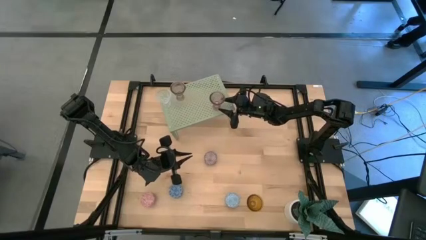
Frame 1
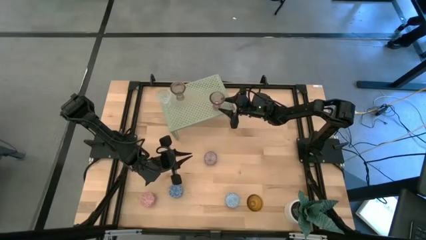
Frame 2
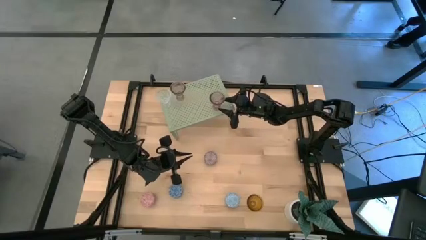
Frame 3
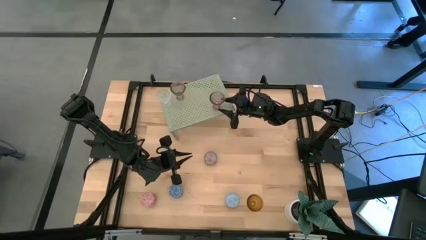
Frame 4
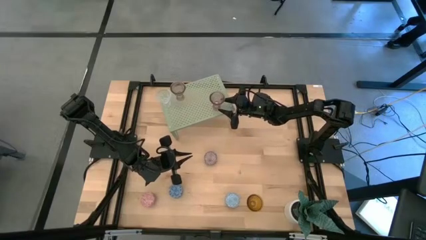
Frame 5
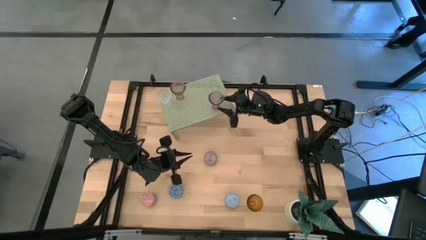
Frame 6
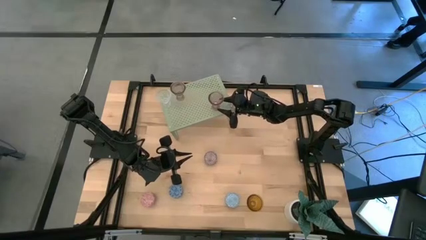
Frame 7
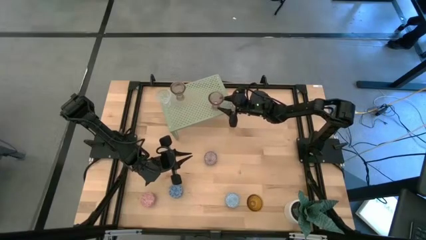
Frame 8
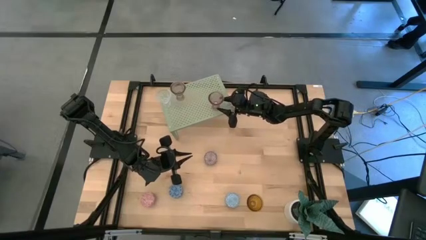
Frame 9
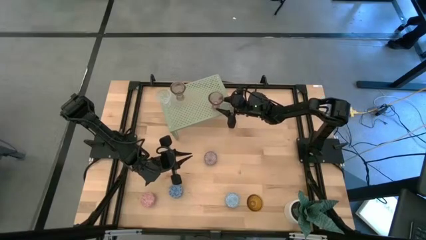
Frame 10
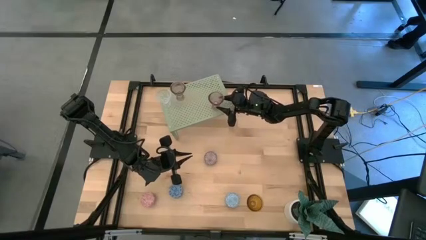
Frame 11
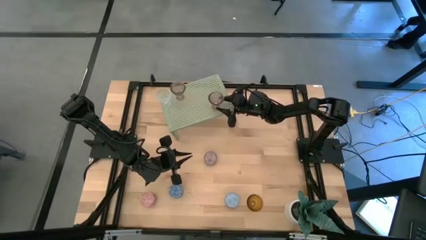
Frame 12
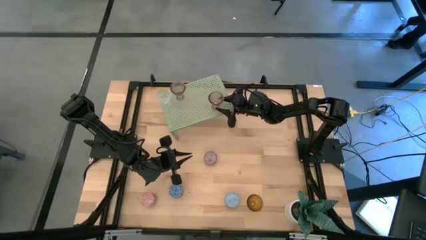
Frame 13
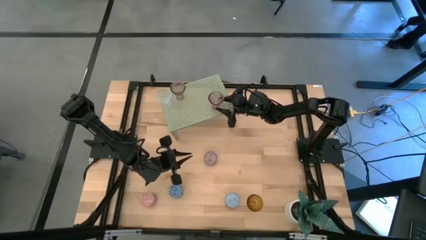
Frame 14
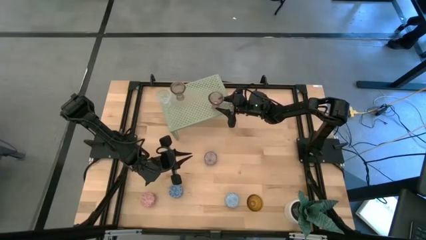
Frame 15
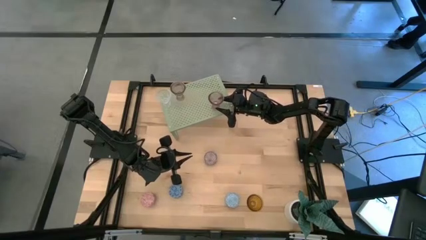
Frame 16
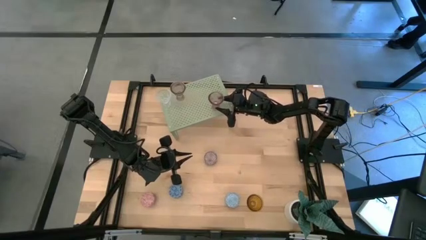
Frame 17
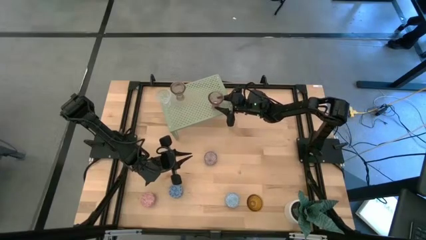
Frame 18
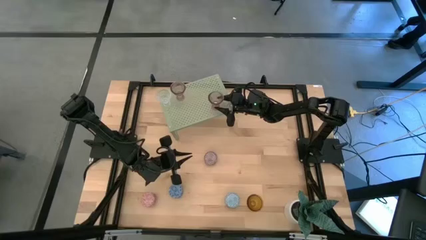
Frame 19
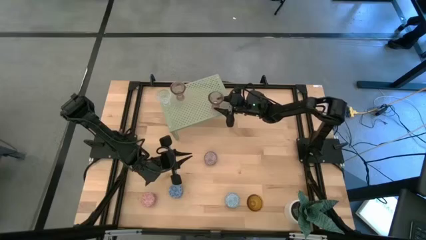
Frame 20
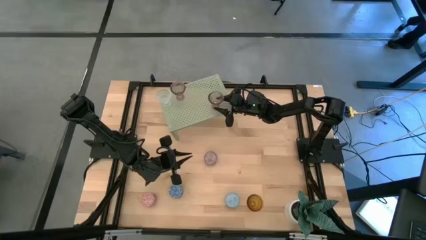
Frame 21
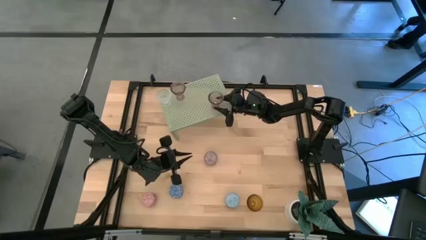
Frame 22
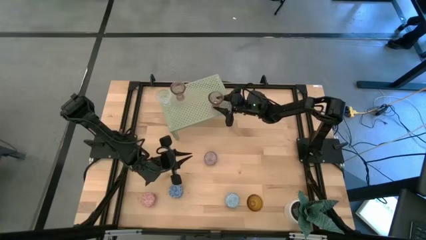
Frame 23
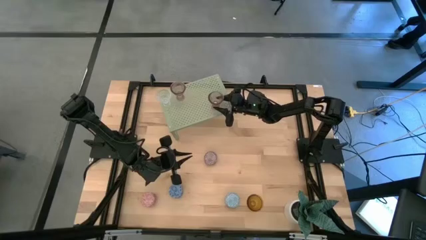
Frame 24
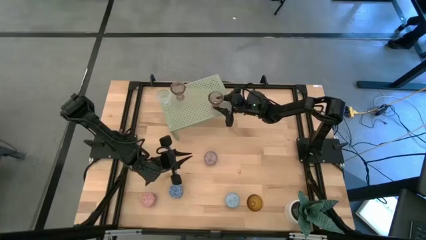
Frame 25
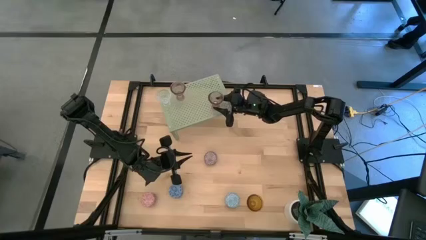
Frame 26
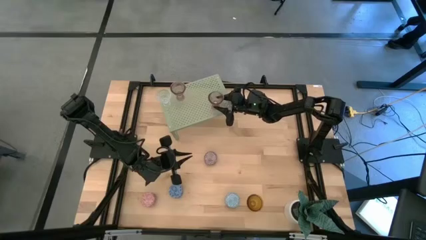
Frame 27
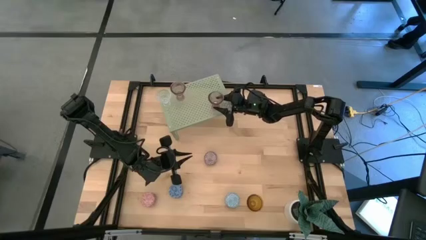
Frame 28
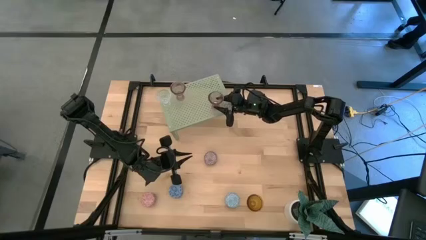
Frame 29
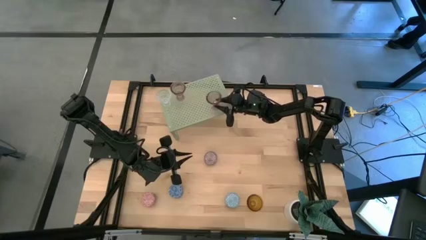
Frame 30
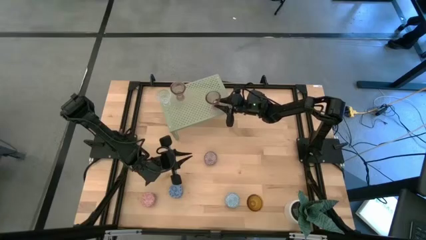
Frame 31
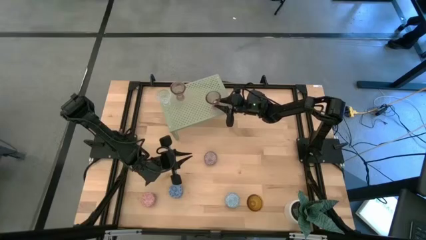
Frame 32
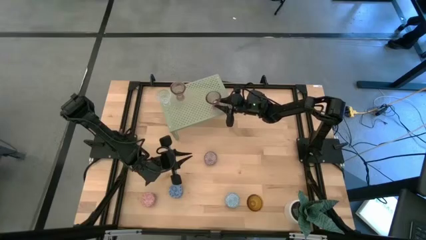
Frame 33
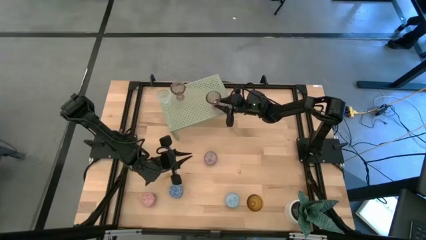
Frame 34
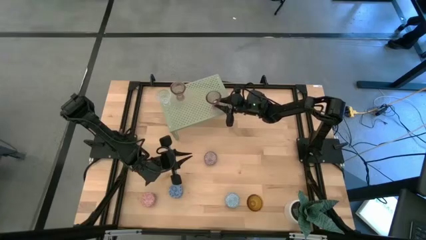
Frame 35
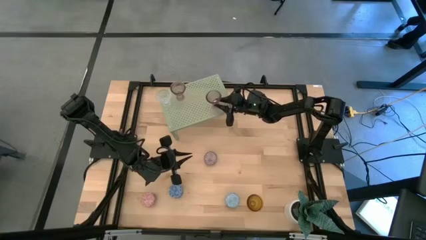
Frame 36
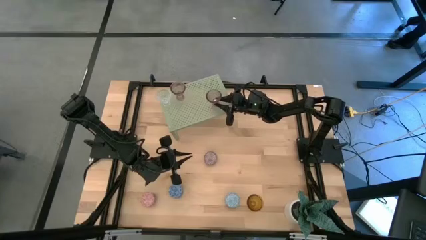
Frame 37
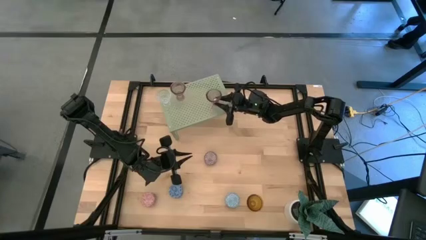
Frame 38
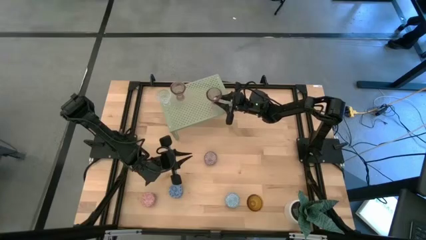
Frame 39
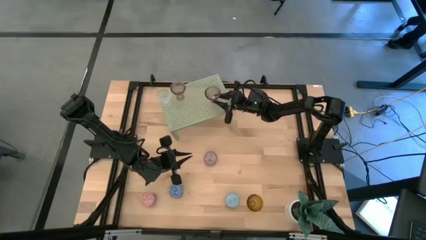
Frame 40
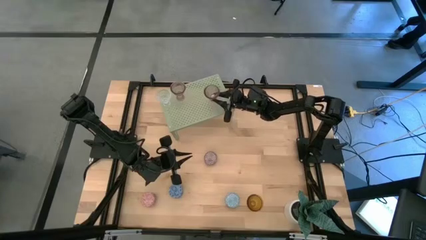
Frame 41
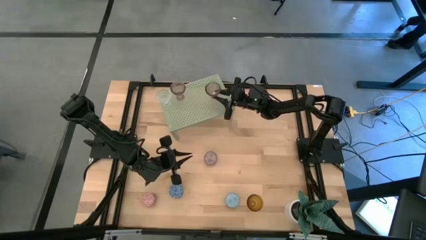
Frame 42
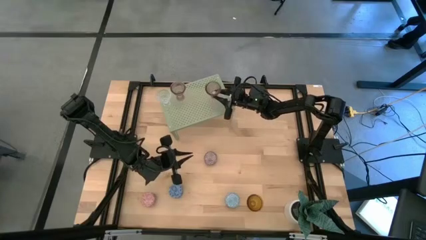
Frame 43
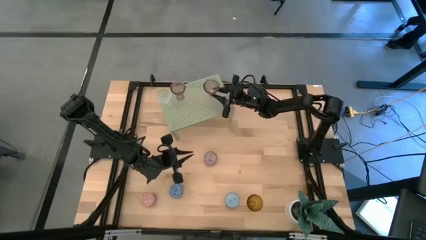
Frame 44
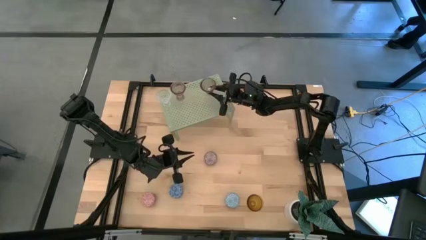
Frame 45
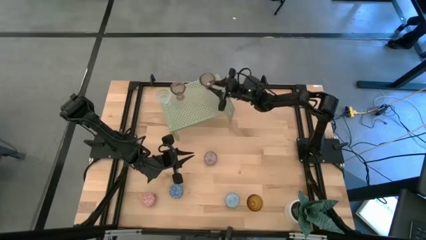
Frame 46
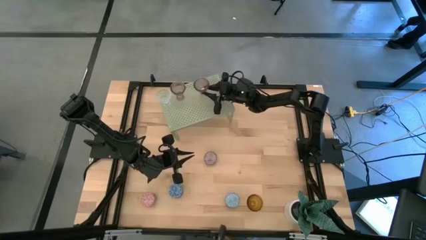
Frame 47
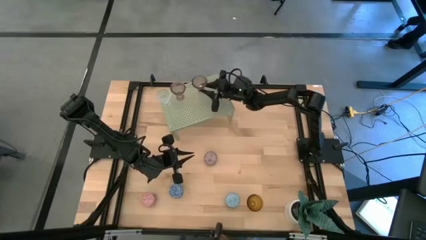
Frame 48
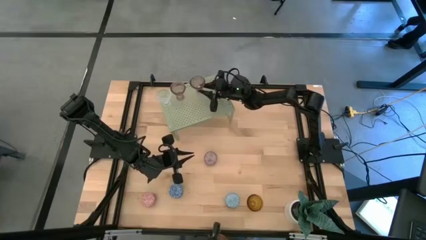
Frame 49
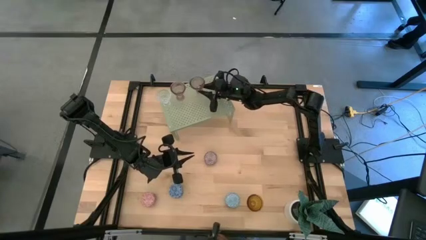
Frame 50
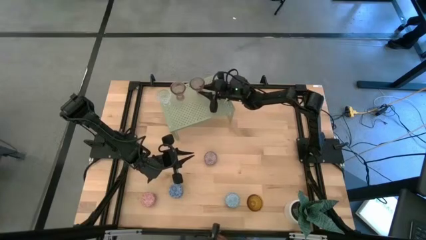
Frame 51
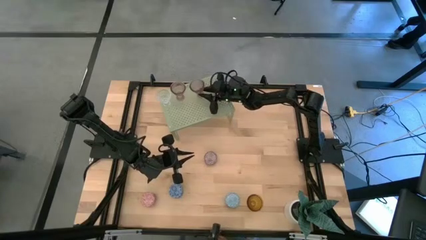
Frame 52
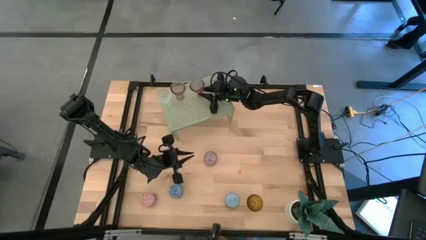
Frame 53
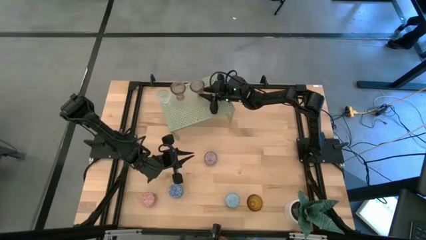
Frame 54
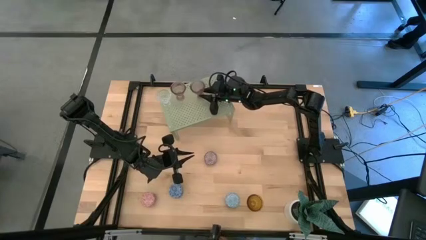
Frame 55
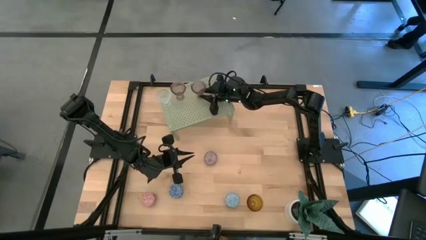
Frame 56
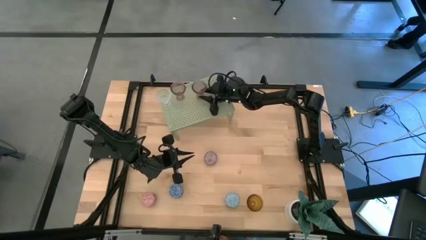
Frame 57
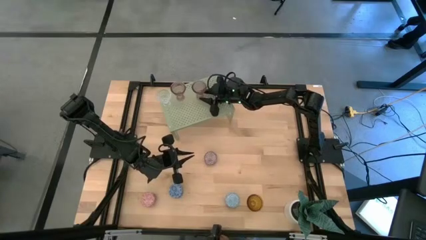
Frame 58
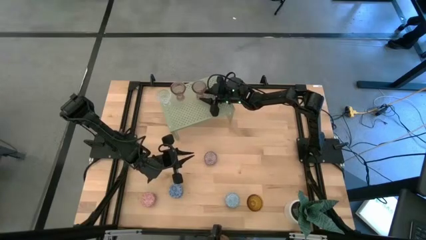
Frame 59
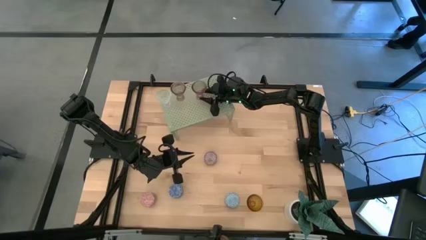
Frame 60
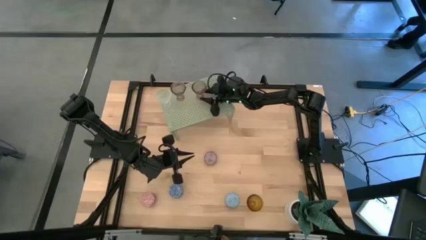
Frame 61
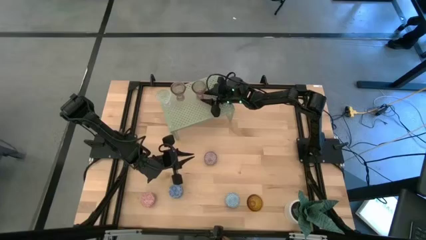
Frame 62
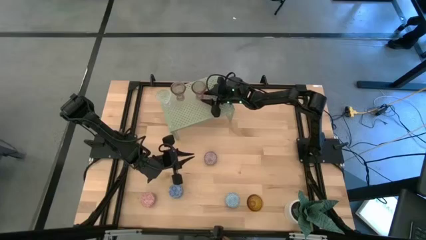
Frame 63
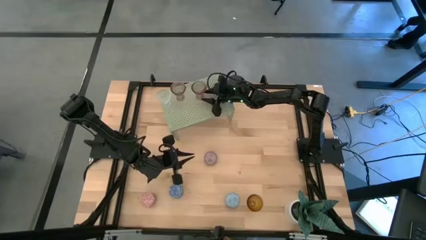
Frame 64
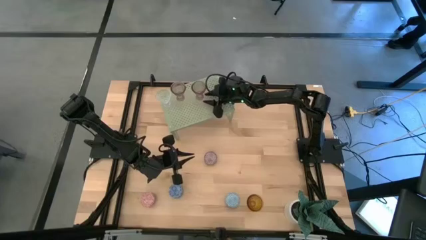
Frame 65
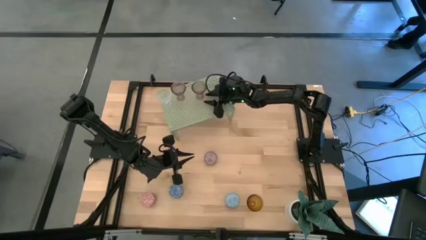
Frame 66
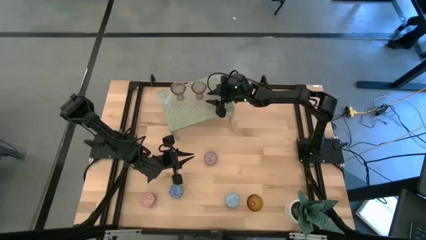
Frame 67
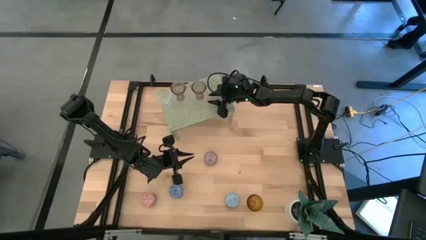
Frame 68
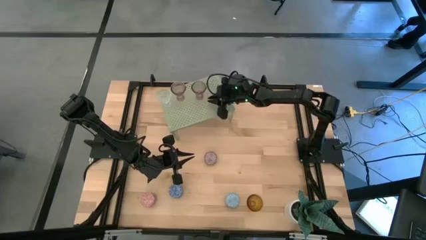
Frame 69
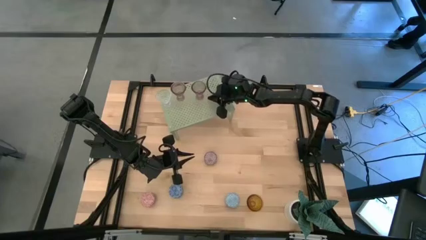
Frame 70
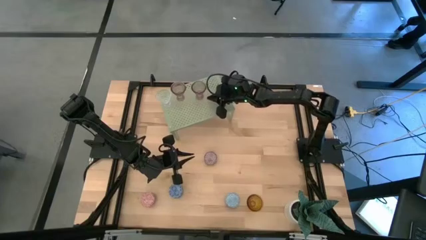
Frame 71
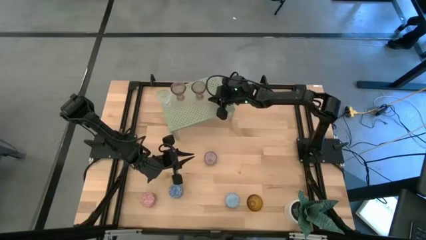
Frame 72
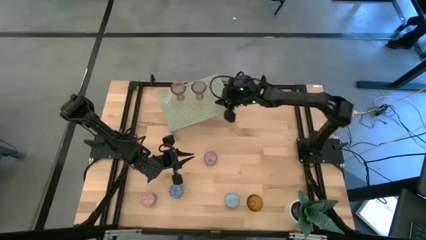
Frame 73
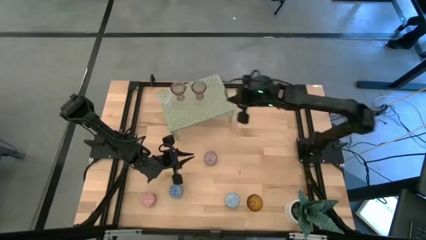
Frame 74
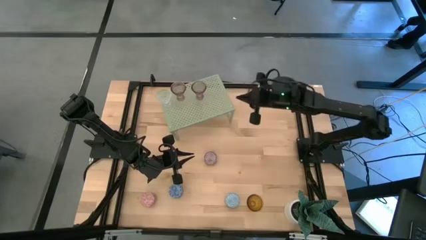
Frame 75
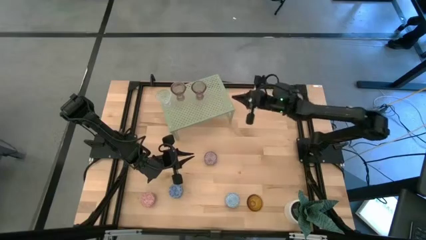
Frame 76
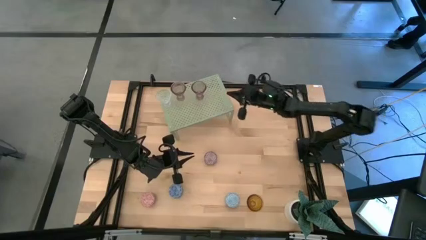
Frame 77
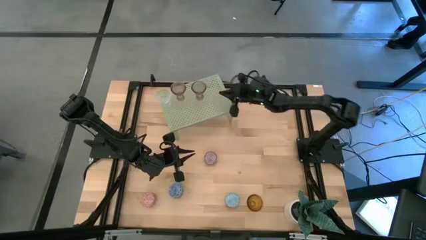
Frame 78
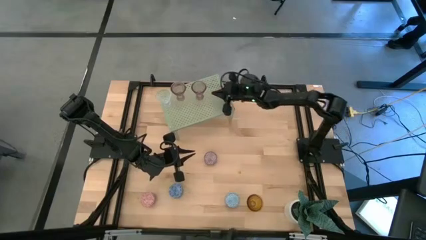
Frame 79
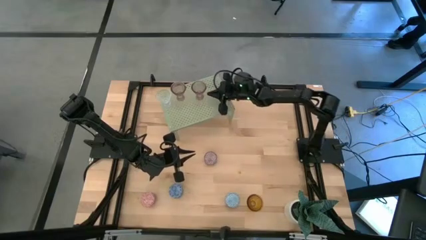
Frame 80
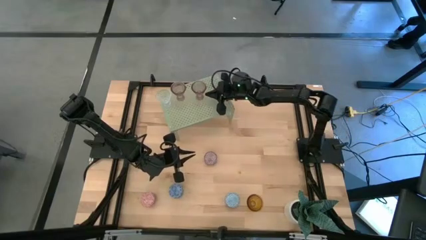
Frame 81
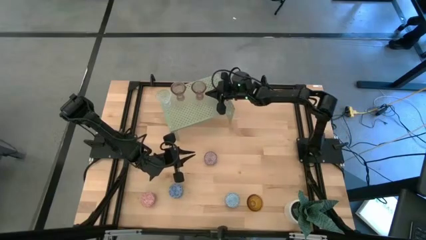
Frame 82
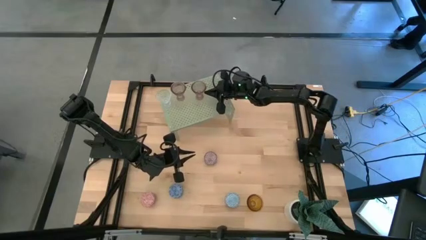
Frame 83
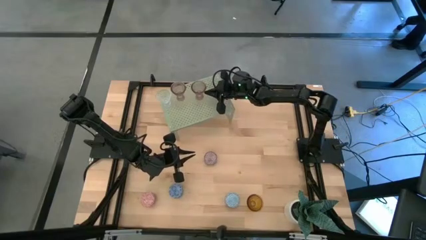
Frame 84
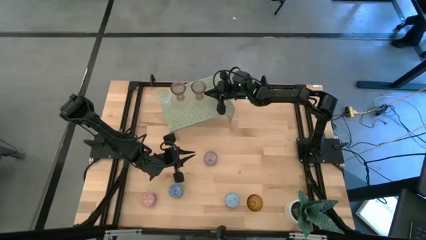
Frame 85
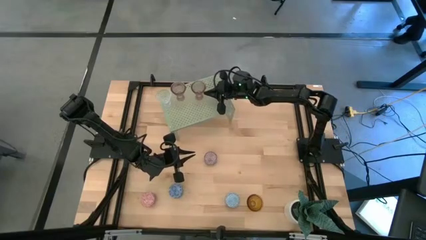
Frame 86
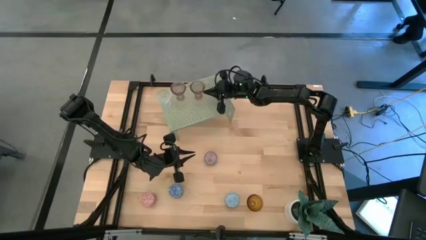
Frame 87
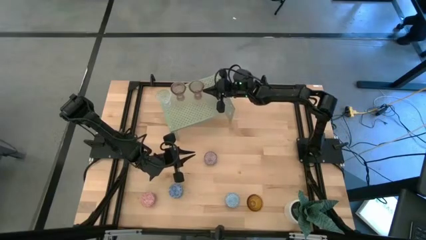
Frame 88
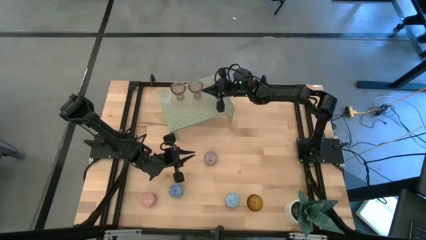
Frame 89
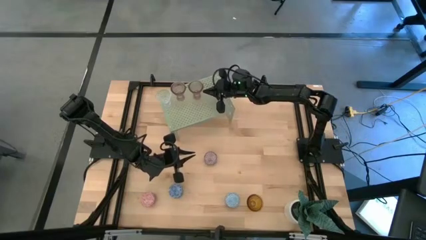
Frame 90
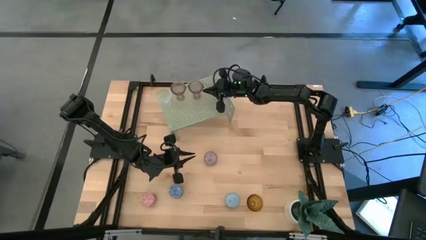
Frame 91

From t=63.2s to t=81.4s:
Task: Pick & Place candle stick holders
Put the pink glass candle holder on the shelf aligned with the other glass candle holders
